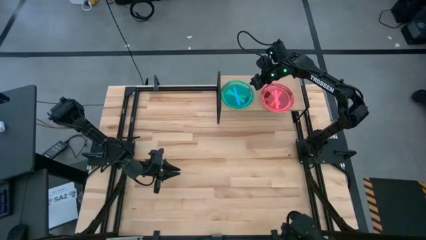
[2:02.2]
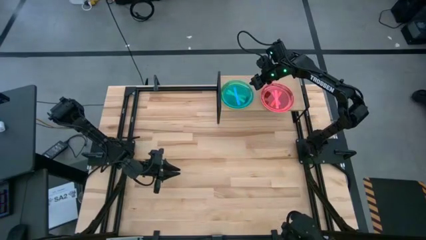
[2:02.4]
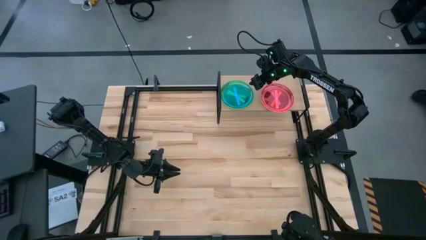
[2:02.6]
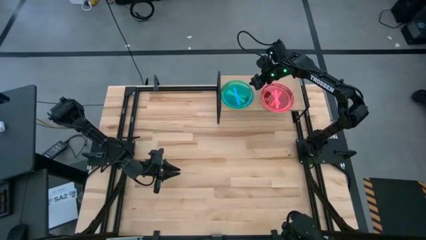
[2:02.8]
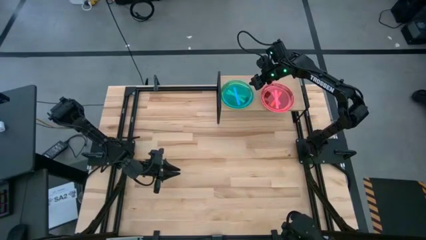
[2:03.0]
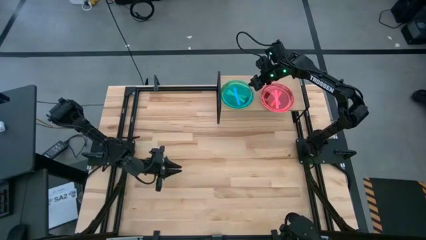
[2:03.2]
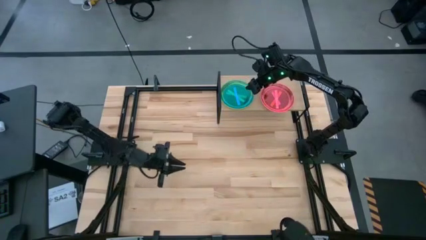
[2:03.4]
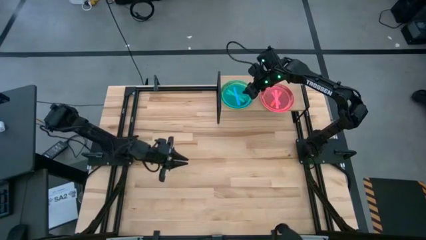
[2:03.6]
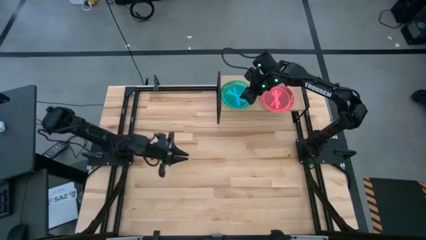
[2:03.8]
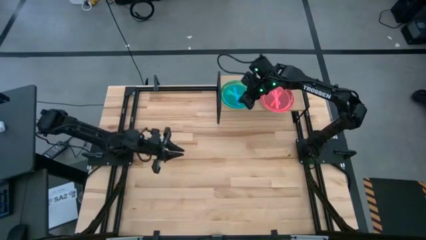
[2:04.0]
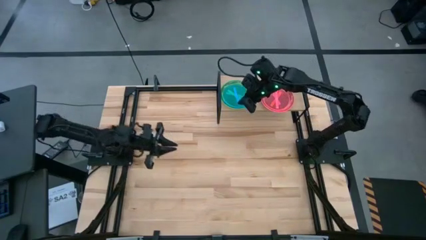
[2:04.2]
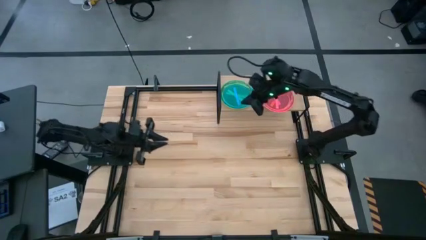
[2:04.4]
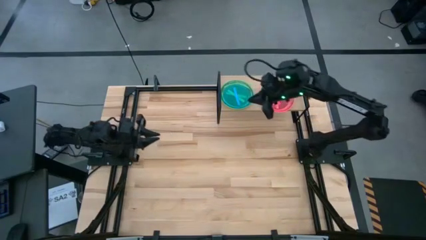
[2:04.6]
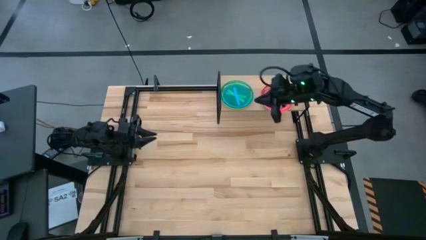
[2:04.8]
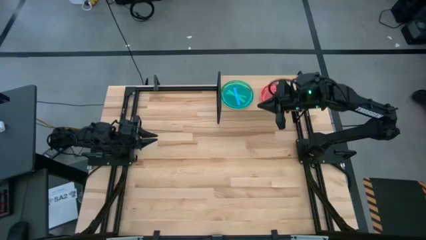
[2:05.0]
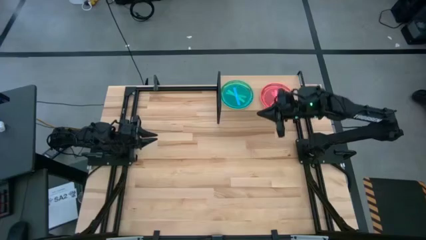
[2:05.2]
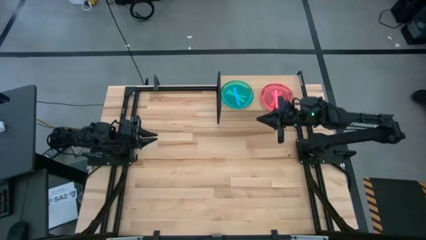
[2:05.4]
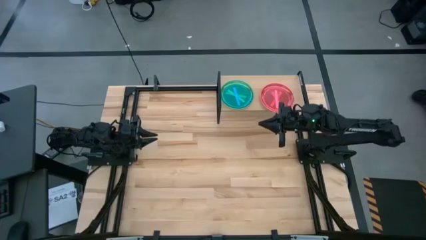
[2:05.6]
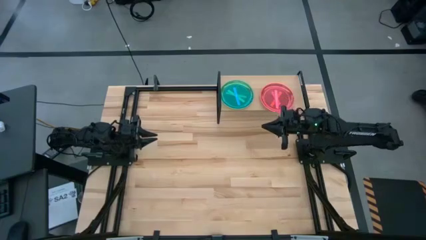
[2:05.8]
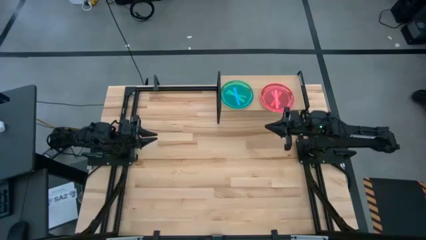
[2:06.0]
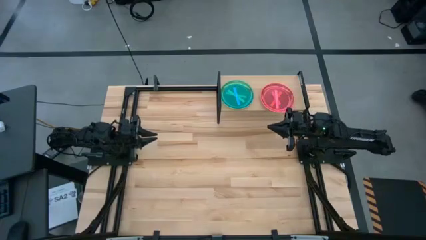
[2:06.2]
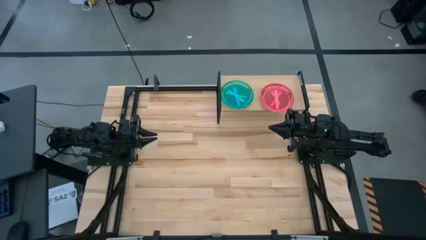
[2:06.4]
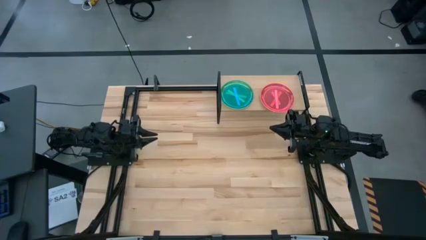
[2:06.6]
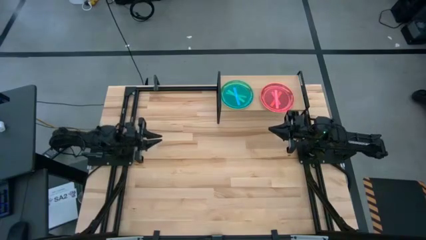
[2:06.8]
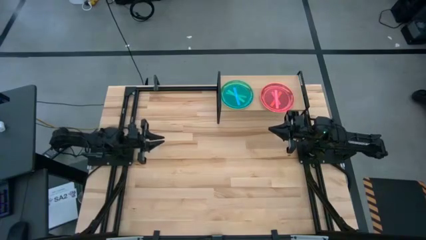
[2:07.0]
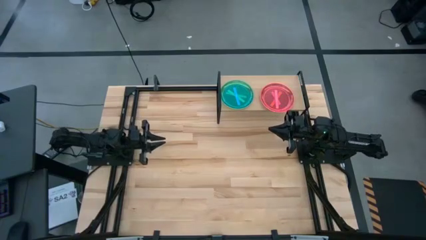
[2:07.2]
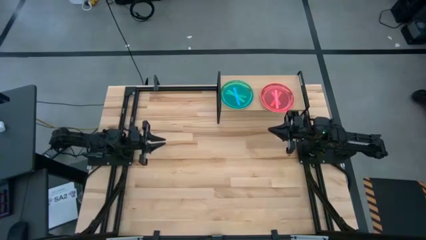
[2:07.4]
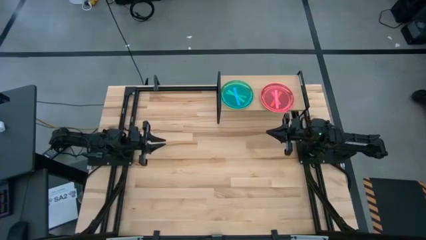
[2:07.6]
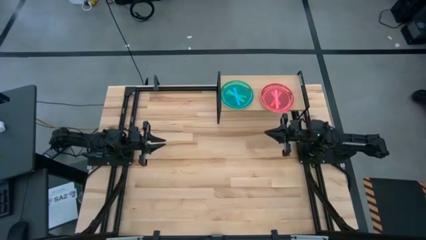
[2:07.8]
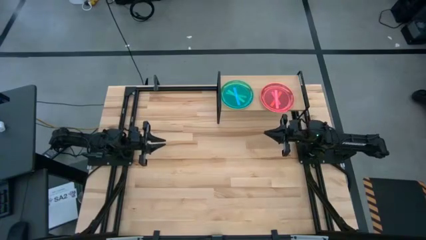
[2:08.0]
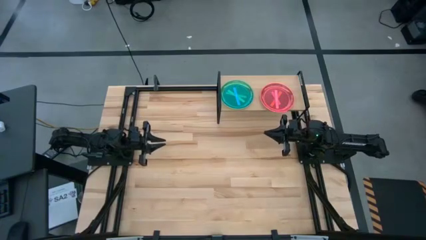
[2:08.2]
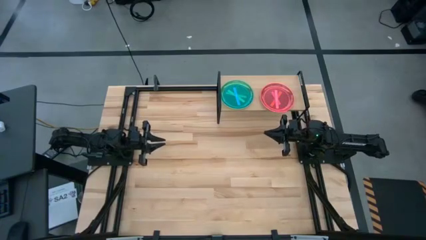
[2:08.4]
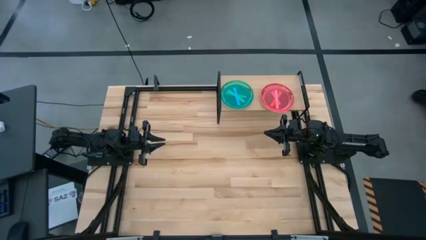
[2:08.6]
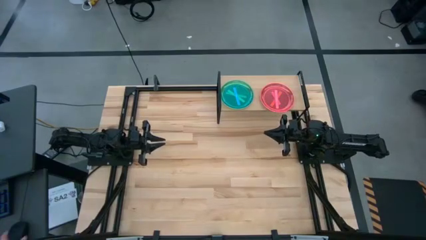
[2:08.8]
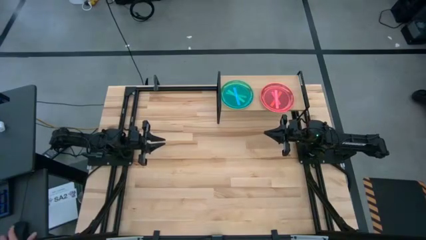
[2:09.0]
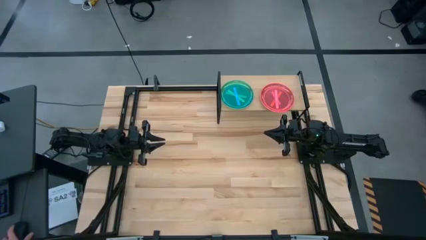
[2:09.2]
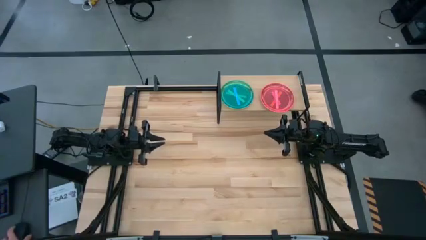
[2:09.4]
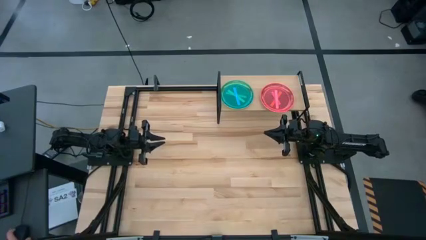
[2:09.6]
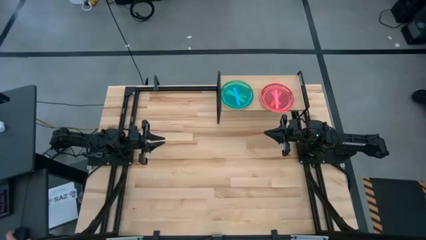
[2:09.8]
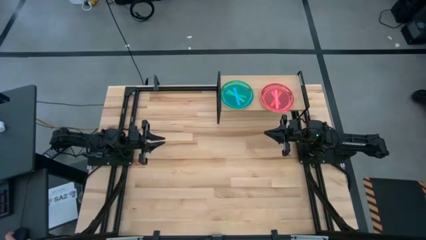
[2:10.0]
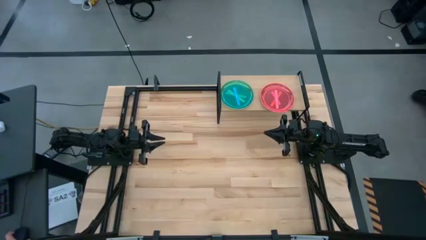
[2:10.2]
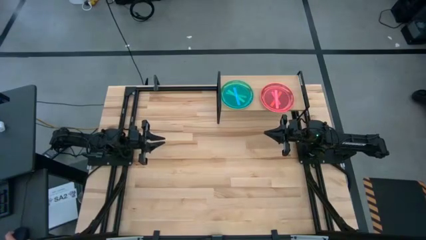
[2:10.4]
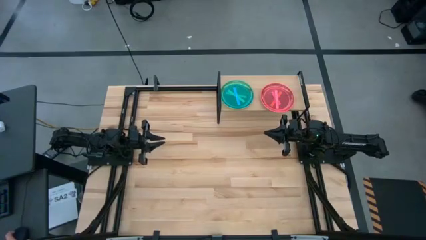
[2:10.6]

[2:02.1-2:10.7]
Task: Place and stack plates onto a shelf
Return to Home Position

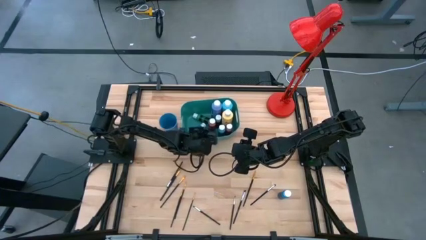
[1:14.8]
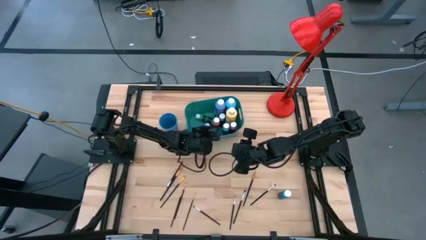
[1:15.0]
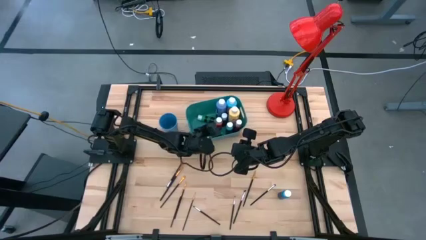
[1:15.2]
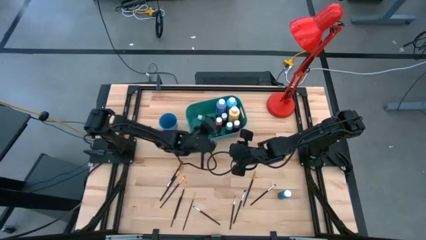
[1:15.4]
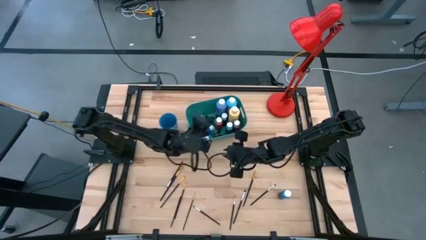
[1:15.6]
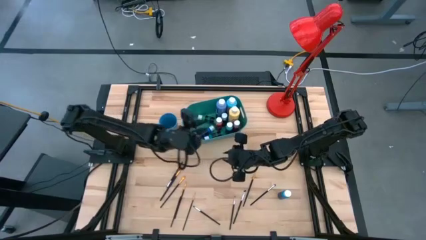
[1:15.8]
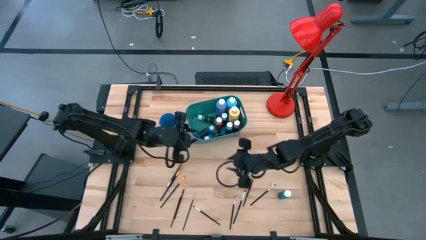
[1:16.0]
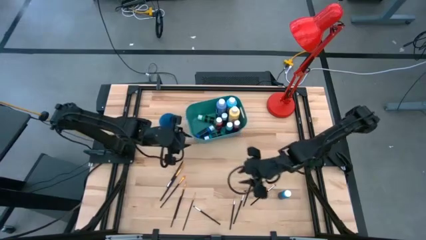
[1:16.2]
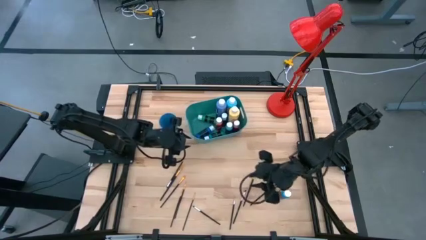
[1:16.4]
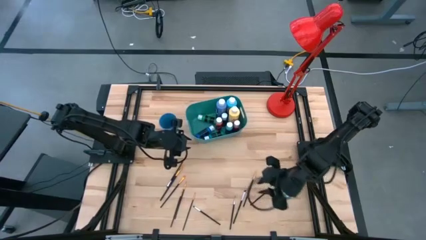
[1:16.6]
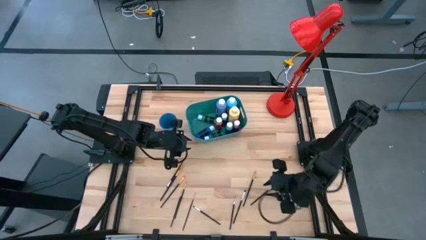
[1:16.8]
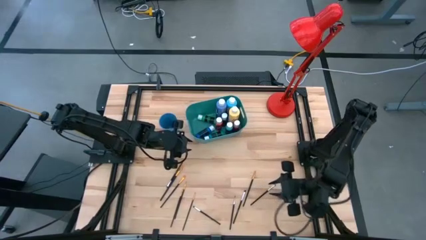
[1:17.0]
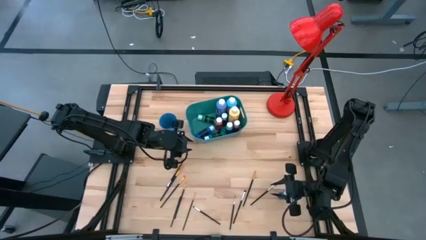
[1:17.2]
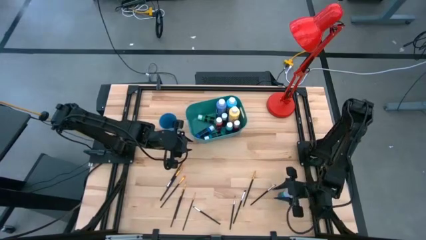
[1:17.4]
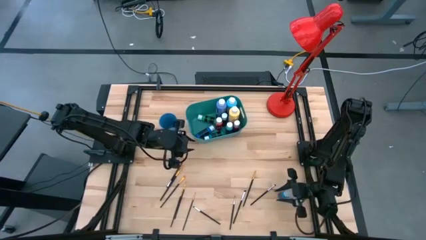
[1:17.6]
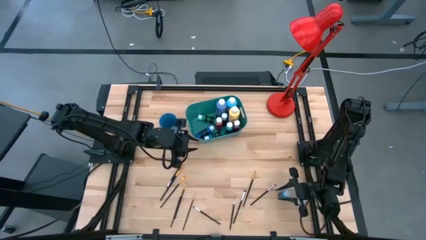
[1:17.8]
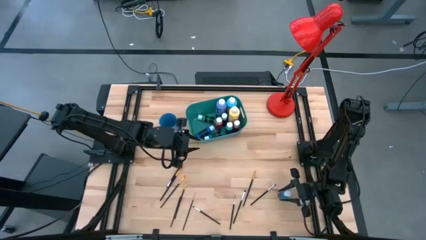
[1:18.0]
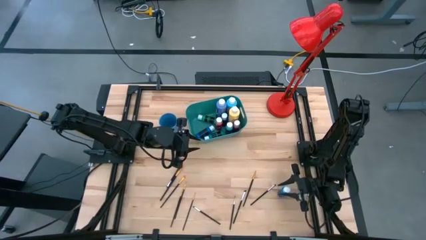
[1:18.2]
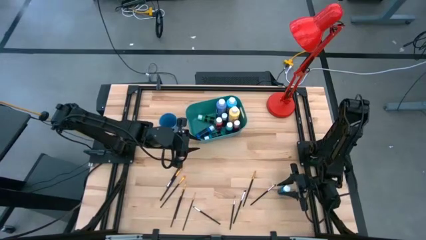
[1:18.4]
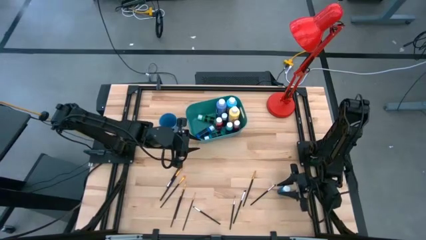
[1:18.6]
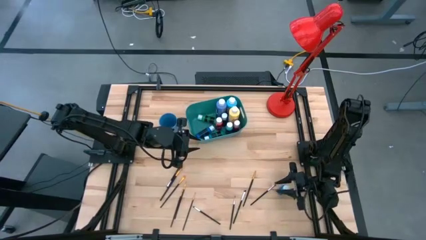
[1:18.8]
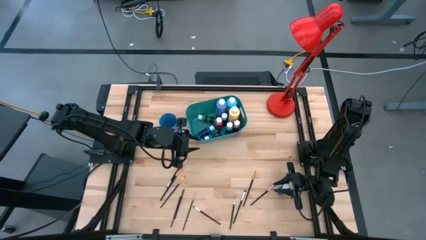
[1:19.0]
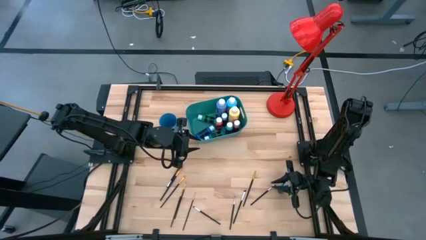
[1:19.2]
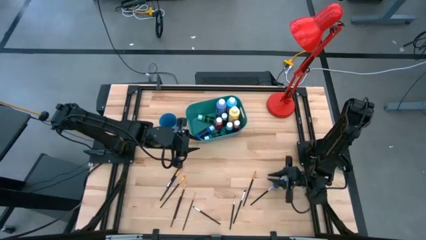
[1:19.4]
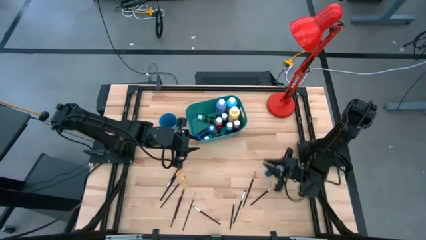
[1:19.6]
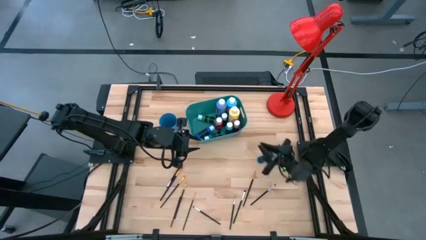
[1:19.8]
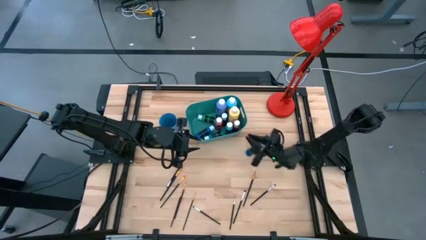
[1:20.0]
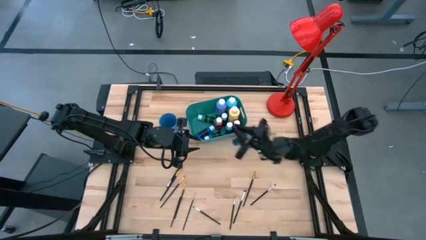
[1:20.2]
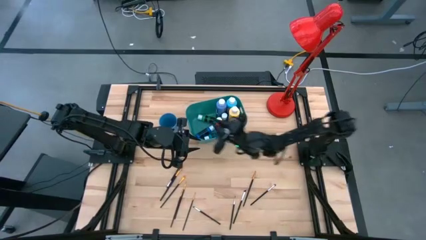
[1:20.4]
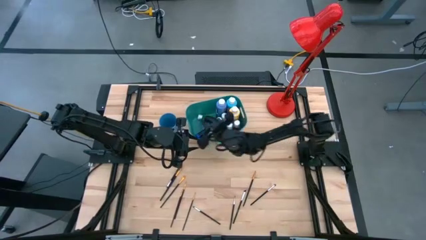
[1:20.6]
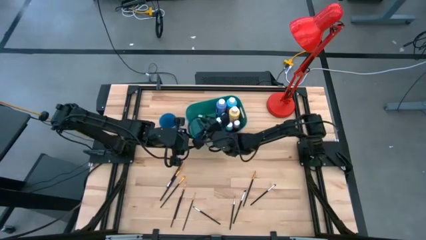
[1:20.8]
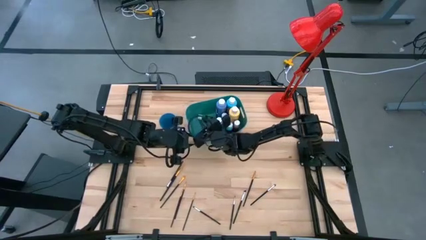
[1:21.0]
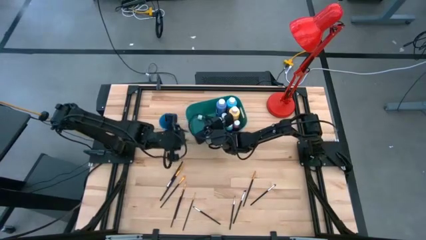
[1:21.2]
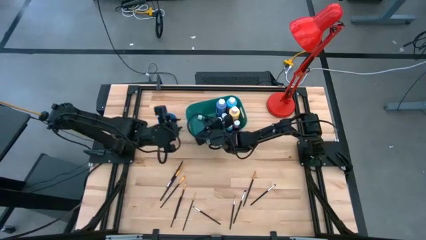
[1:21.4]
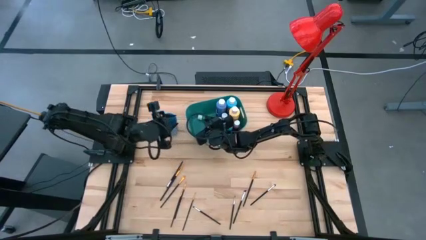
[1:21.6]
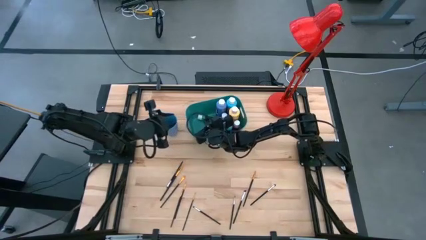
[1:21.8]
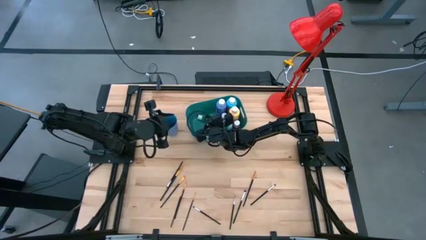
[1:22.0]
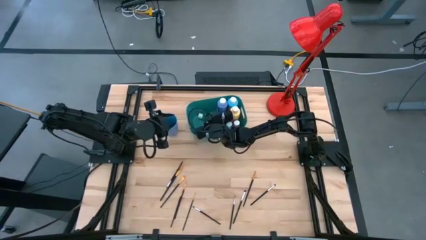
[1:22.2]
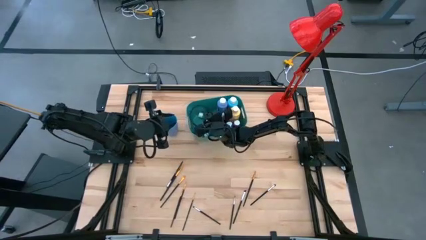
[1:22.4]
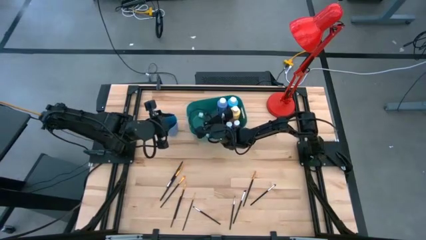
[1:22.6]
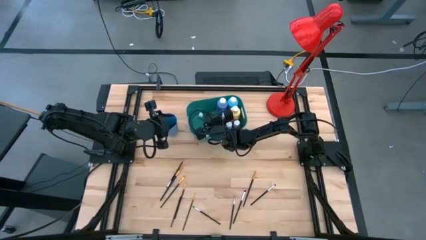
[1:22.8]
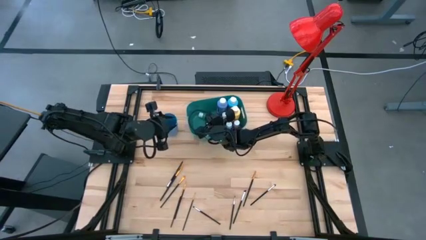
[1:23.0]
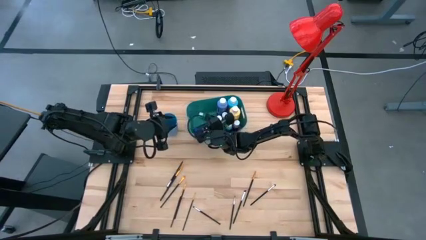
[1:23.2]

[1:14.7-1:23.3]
Task: Pick & Place Paint Supplies
Put the small blue paint bottle into the green bin
